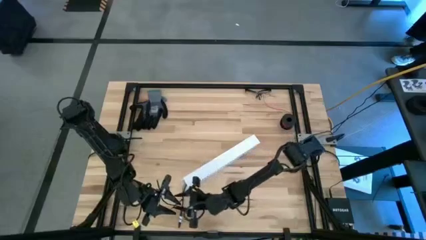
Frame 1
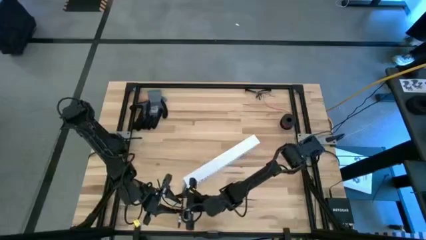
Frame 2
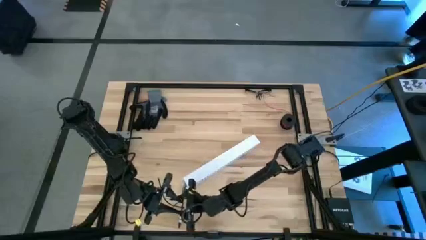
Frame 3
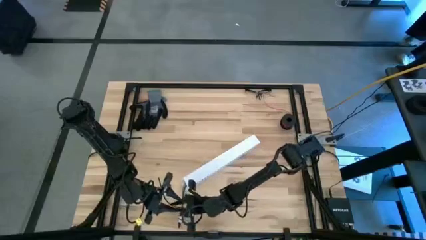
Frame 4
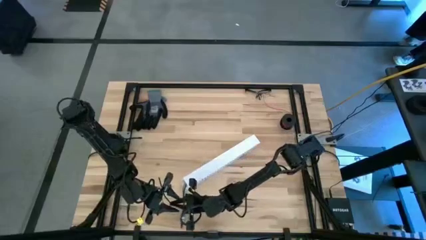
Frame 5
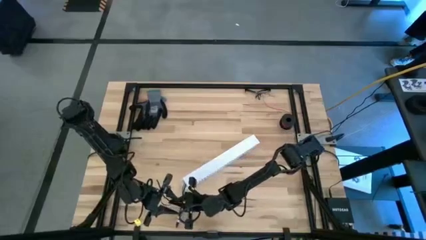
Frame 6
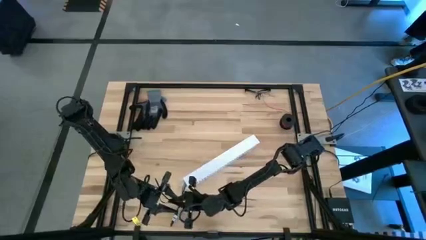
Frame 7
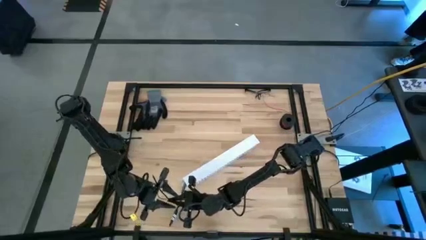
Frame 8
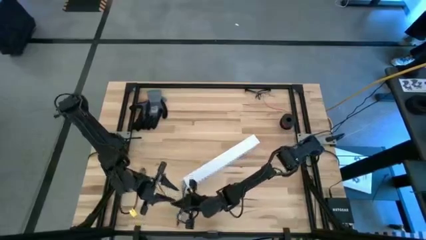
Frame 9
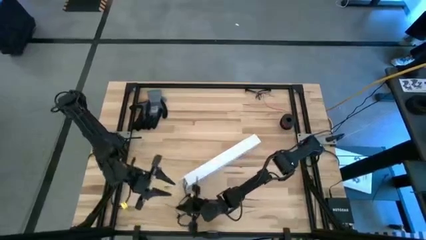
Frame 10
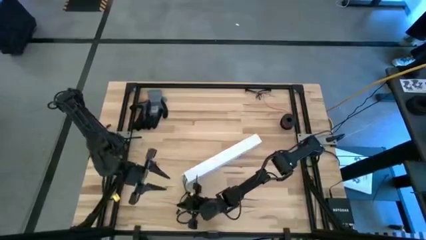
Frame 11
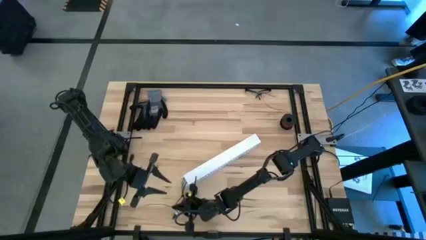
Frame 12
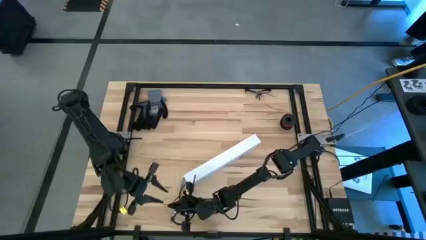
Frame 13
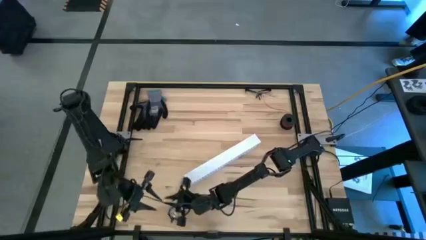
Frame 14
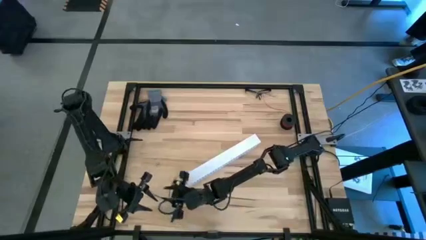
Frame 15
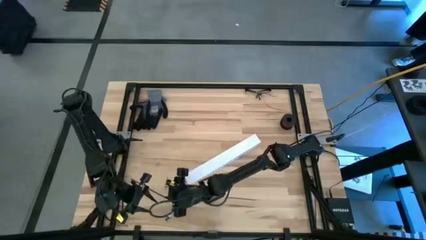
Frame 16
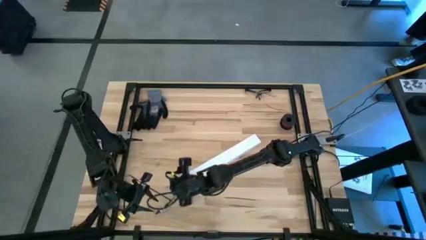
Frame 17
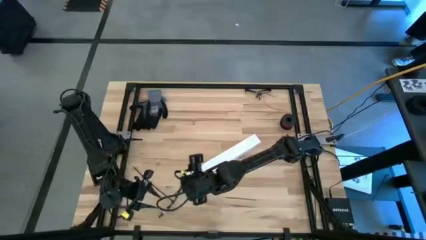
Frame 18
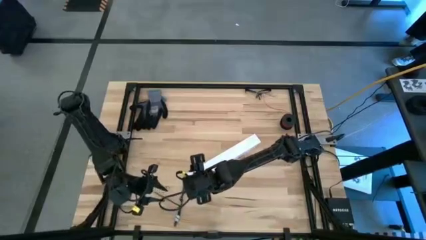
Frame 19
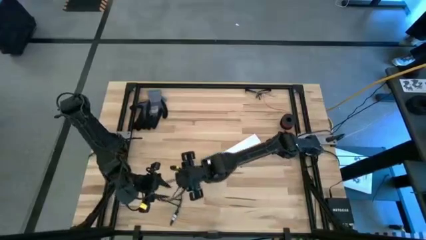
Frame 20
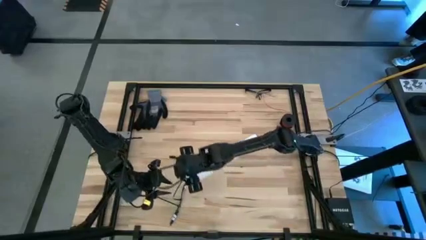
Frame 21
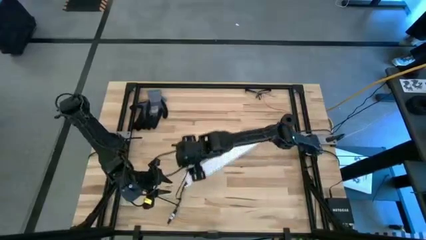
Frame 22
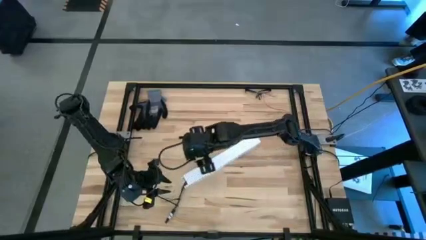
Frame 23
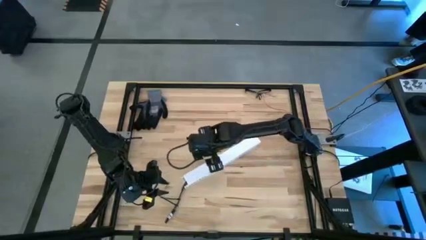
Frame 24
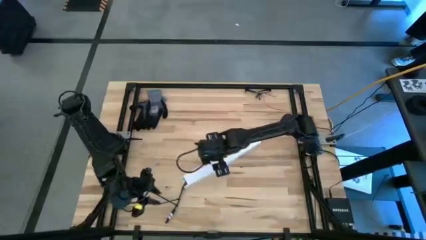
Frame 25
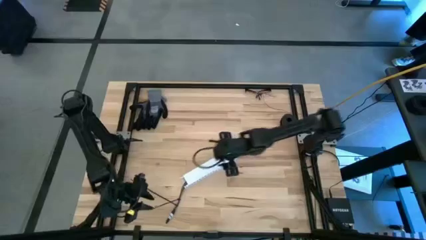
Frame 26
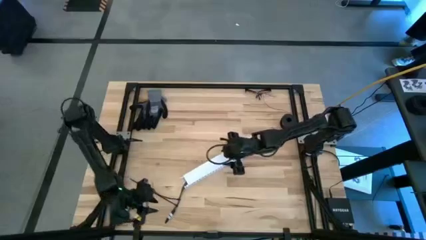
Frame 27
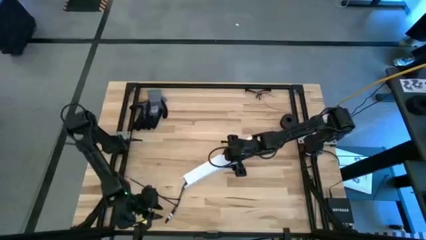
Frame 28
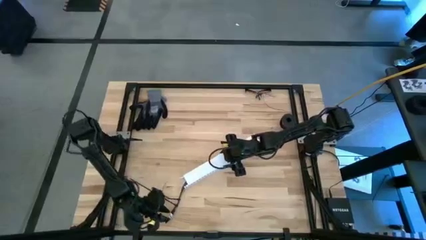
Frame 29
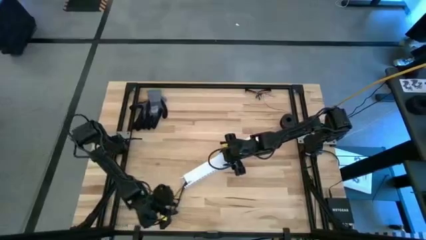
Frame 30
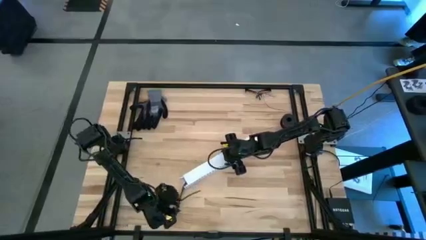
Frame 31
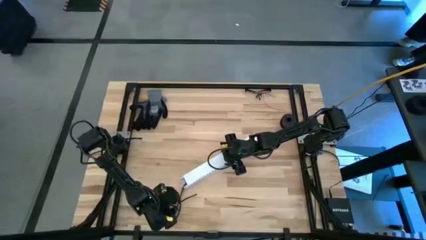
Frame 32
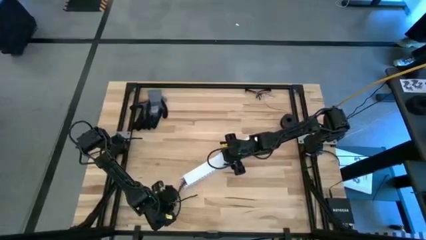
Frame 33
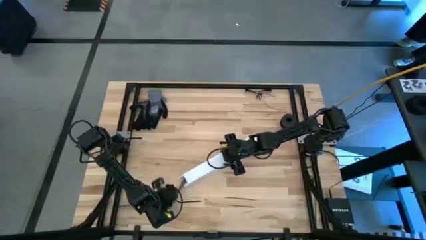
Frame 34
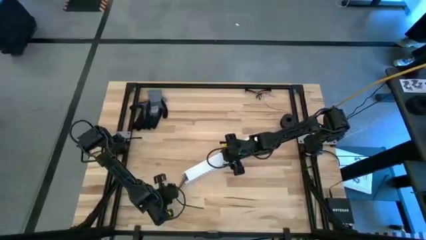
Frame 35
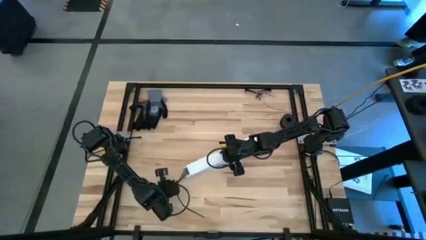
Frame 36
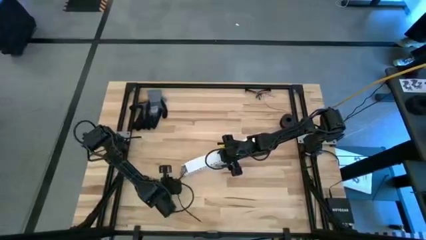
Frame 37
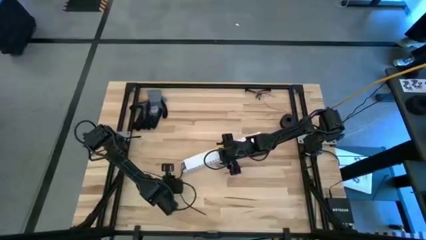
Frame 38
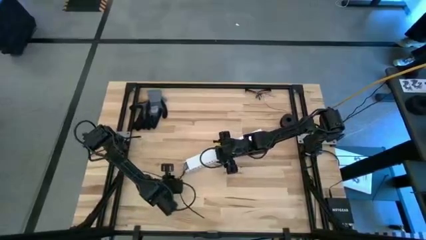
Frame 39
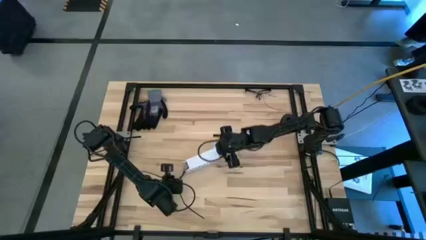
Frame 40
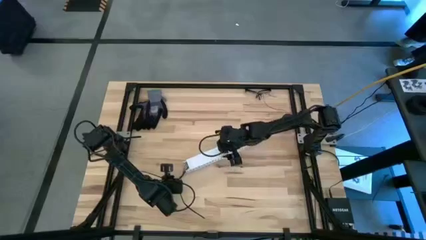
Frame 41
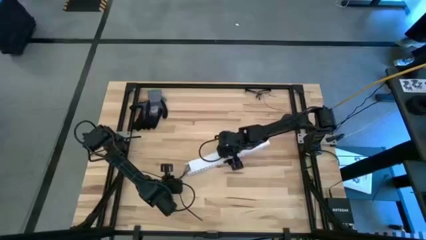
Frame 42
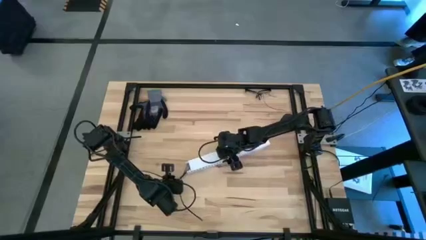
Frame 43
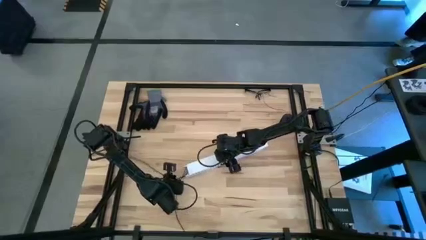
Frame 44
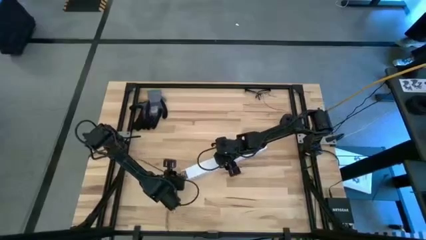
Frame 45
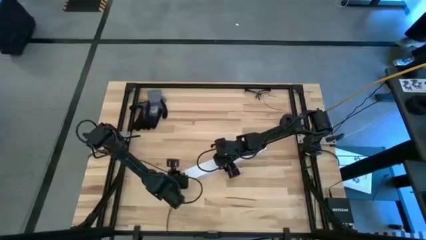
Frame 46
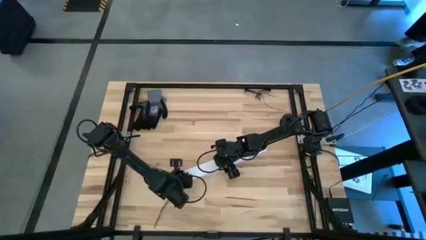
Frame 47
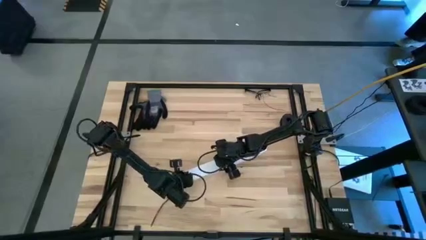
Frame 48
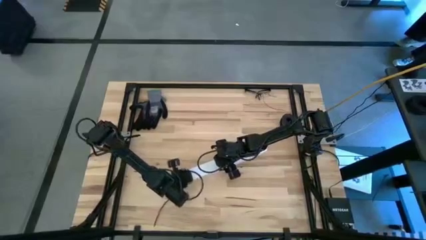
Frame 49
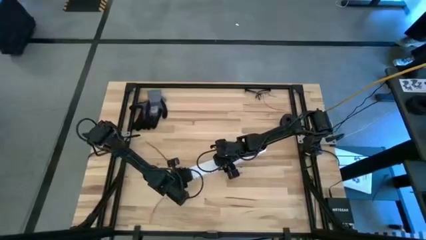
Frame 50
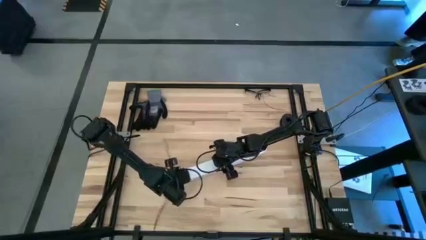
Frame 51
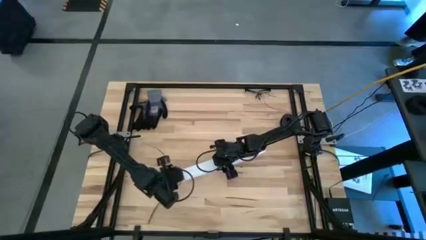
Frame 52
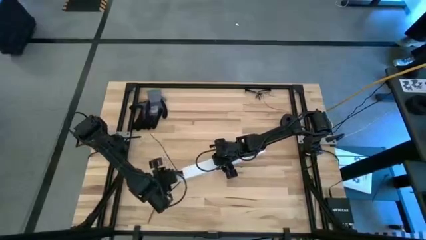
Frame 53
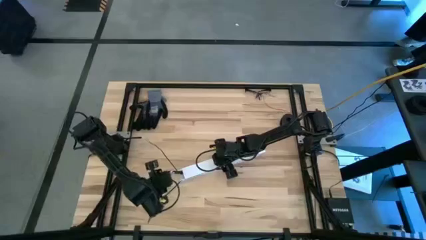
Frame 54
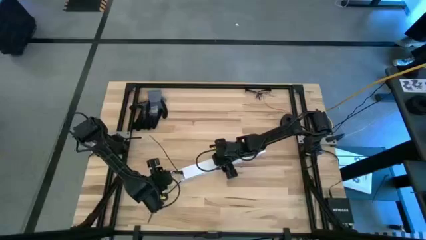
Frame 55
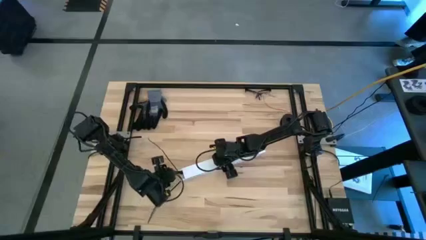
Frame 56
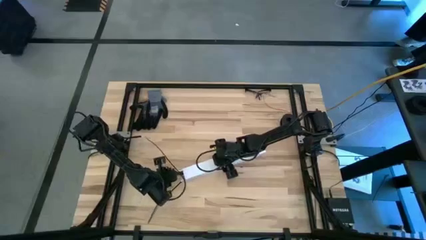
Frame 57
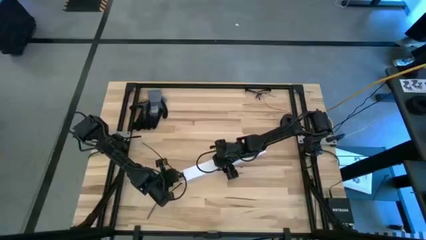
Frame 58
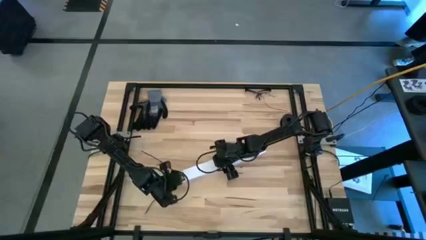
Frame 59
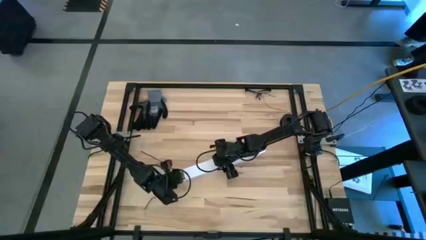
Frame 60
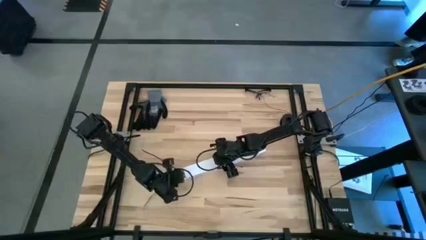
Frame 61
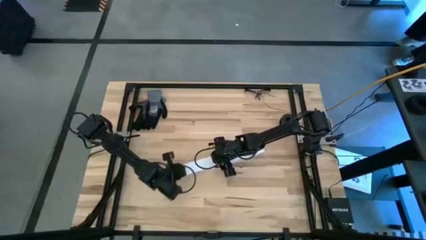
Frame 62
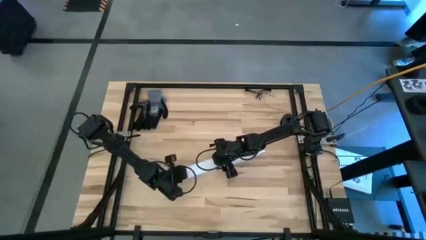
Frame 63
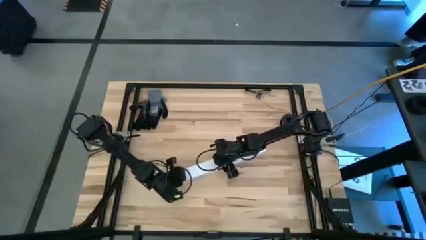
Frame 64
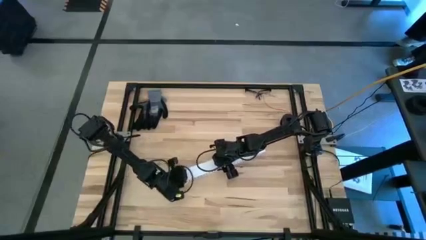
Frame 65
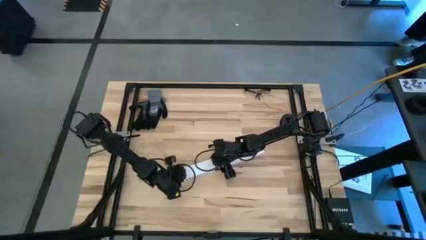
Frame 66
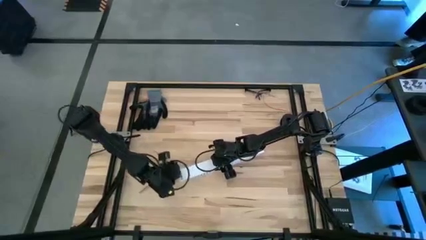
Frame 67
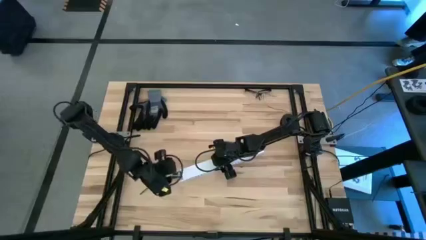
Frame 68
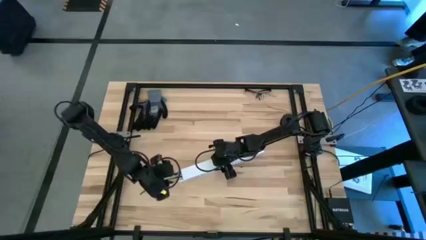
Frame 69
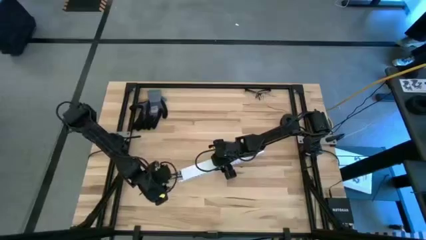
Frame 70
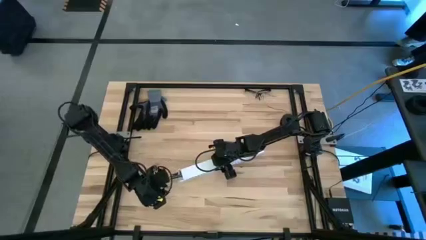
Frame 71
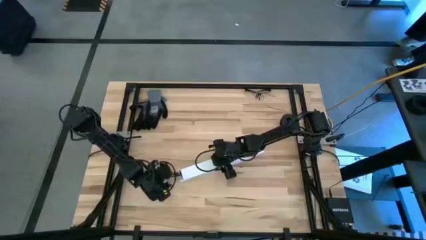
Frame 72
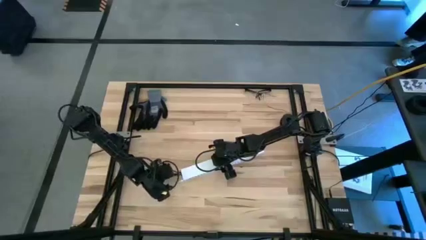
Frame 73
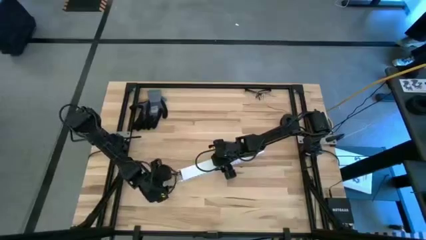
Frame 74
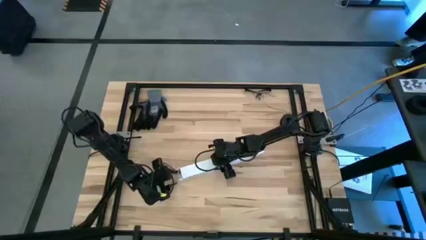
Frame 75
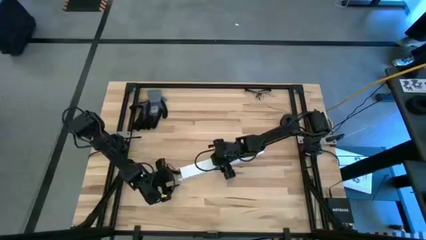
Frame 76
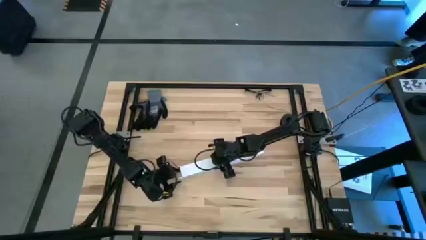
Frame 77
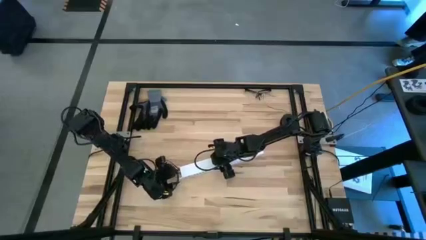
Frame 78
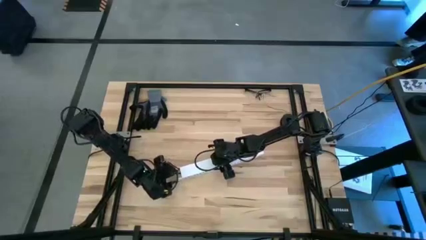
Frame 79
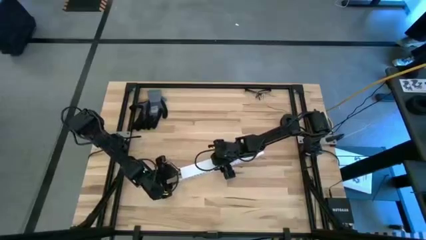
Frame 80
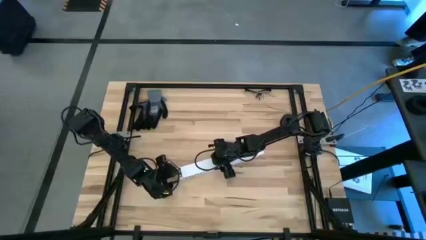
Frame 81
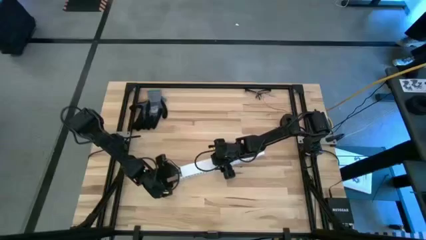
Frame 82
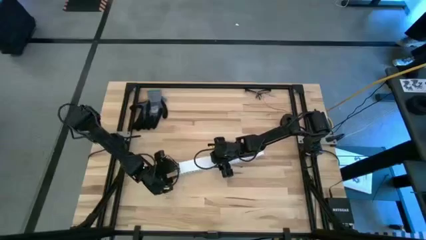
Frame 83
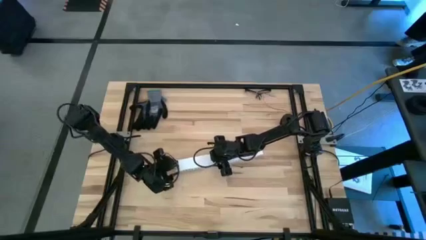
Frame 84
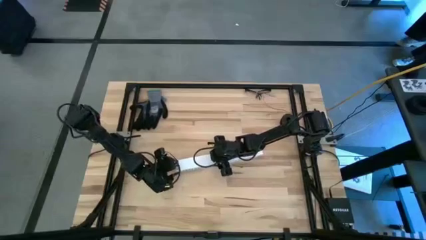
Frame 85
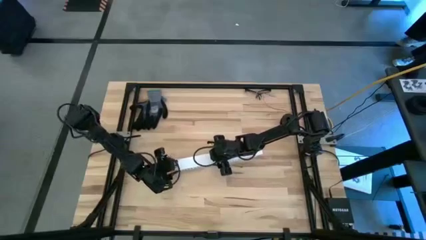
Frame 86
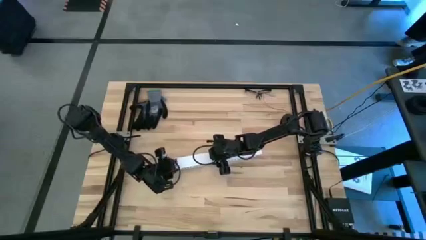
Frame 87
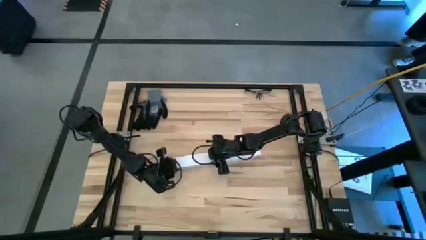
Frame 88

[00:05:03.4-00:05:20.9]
Task: Ziptie cables
Close the white cable duct
